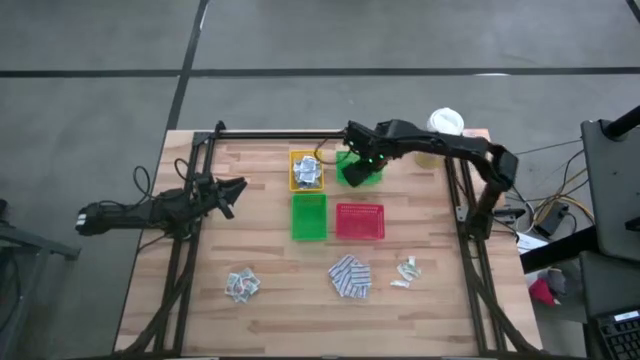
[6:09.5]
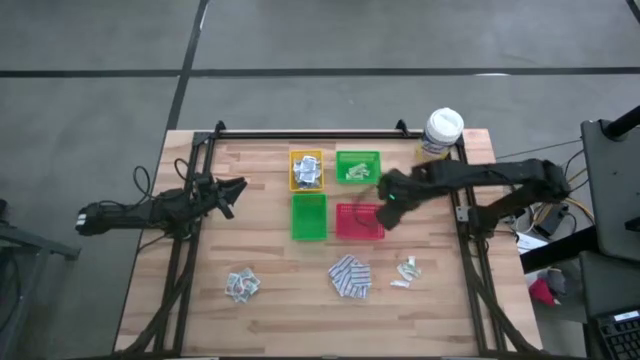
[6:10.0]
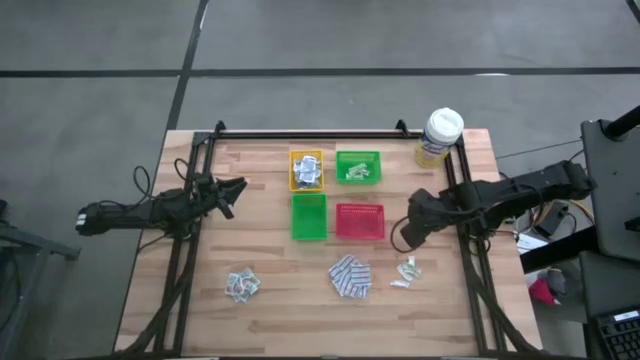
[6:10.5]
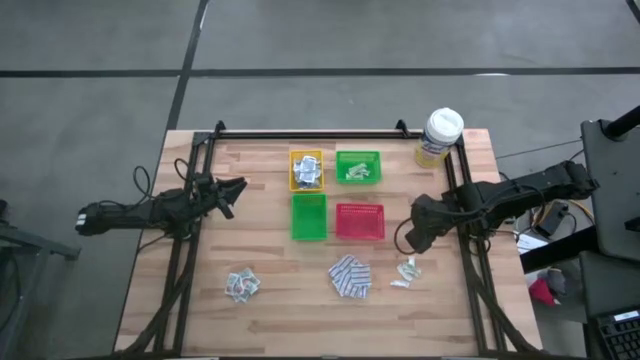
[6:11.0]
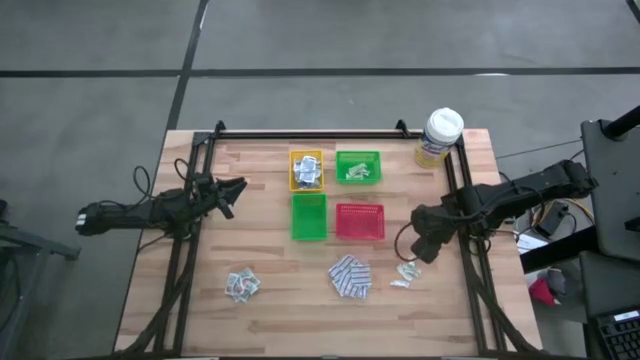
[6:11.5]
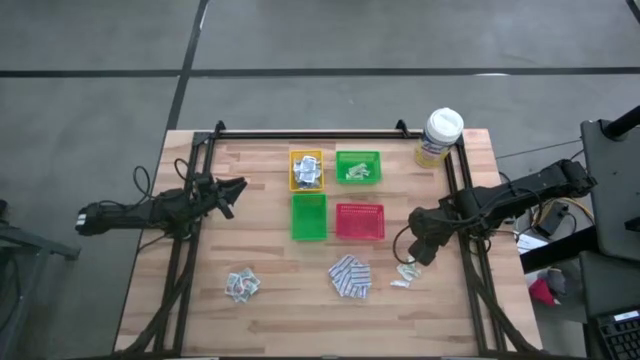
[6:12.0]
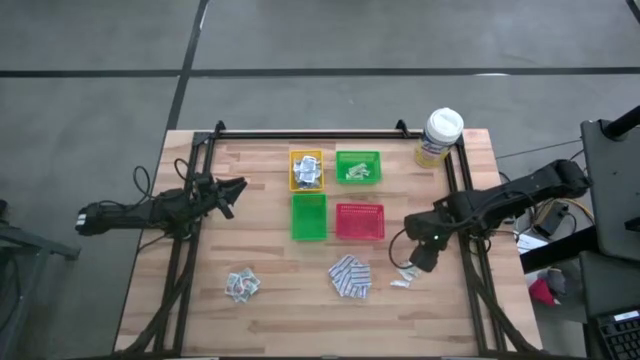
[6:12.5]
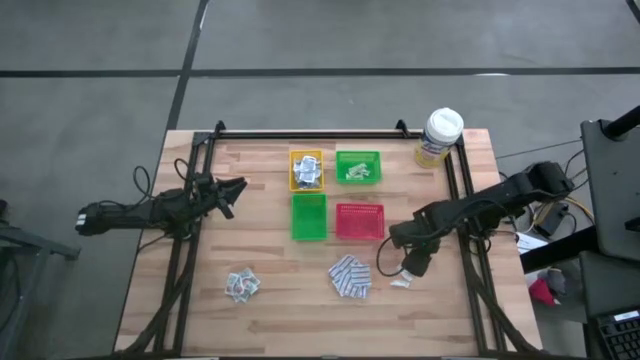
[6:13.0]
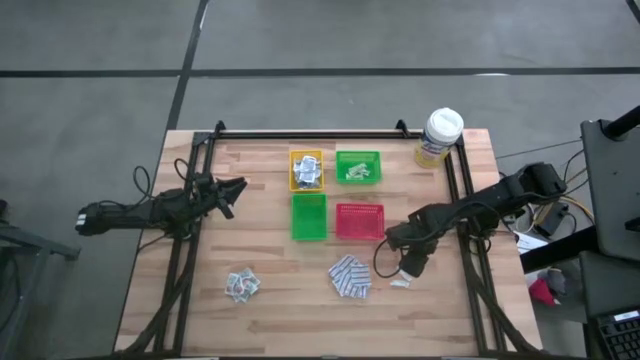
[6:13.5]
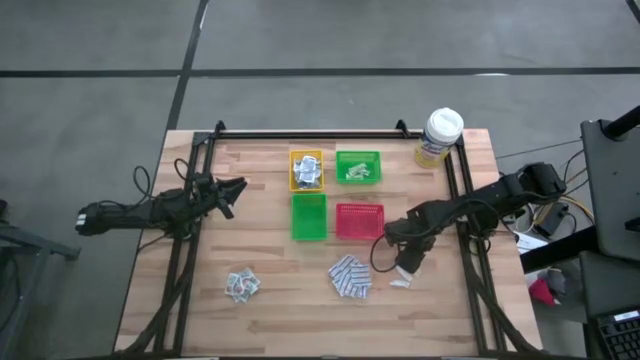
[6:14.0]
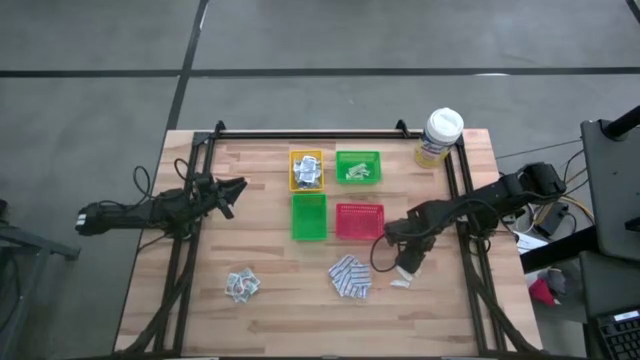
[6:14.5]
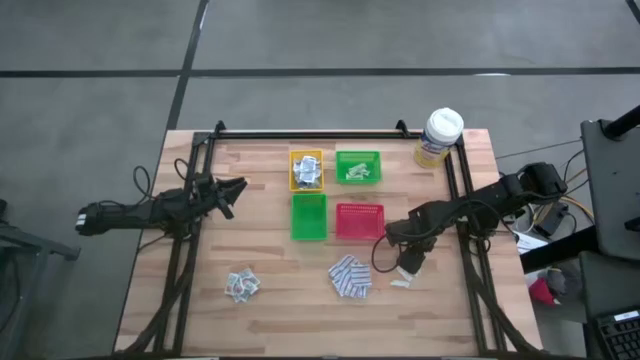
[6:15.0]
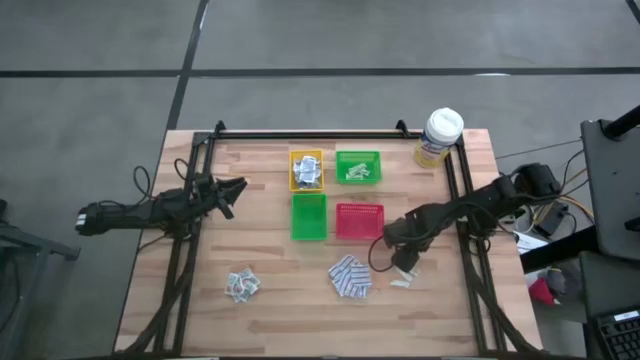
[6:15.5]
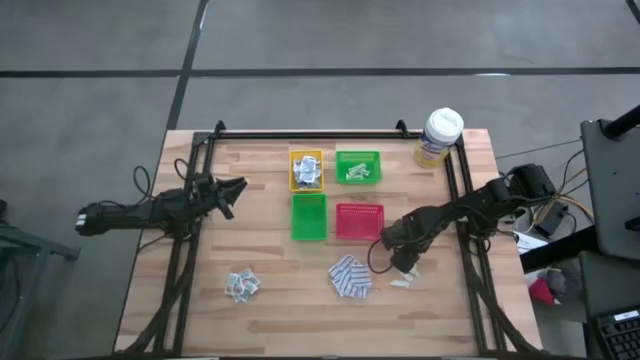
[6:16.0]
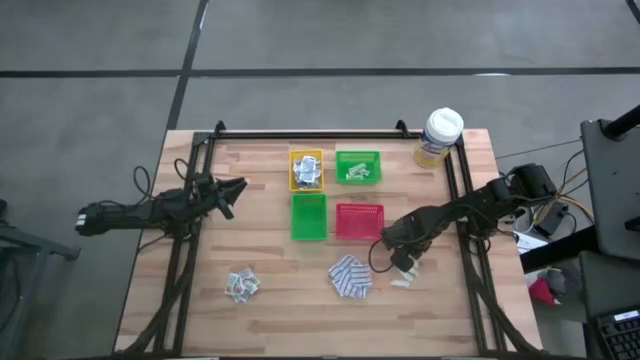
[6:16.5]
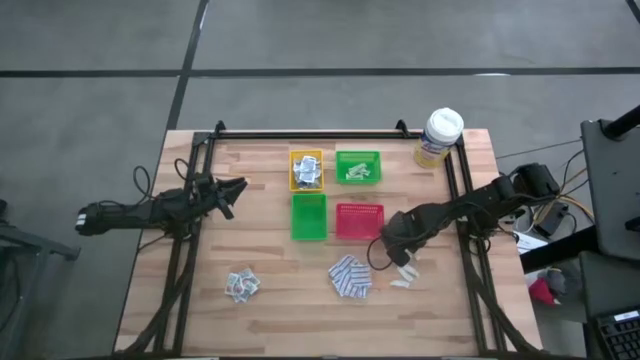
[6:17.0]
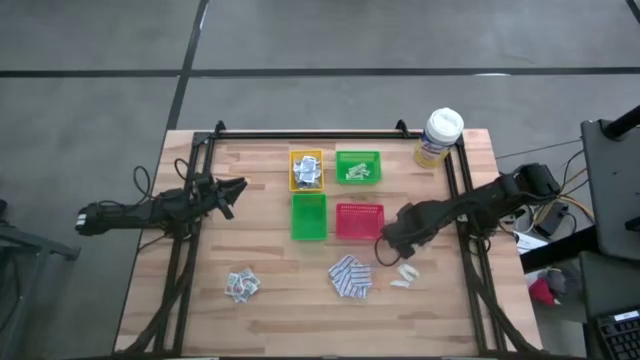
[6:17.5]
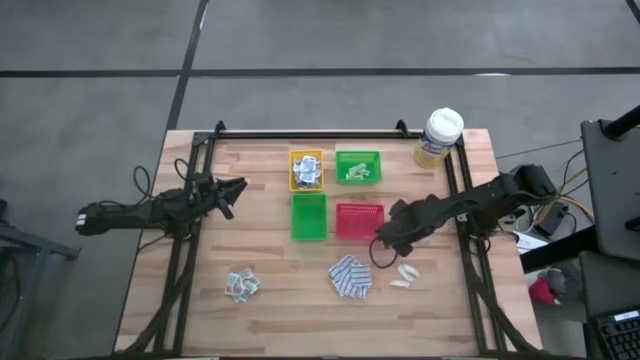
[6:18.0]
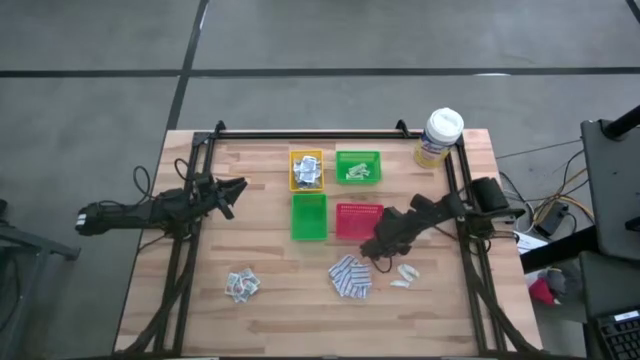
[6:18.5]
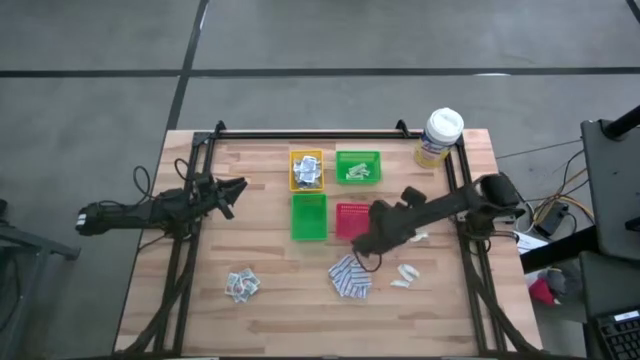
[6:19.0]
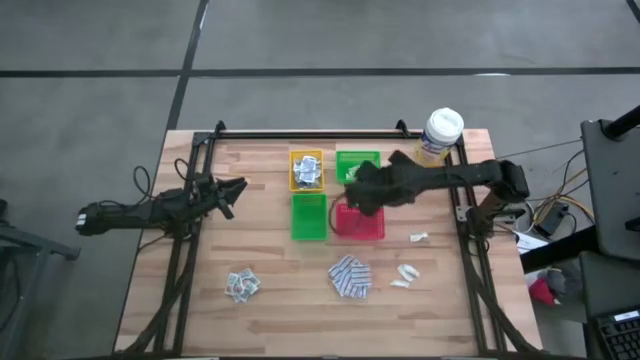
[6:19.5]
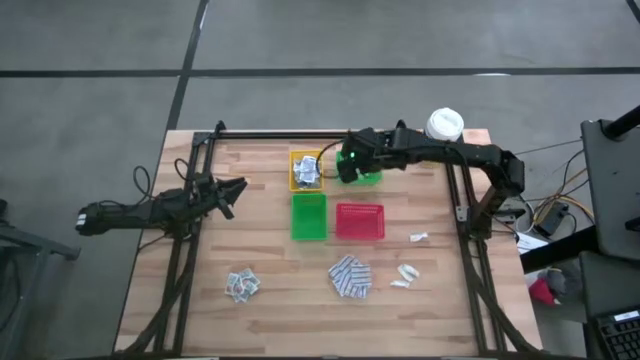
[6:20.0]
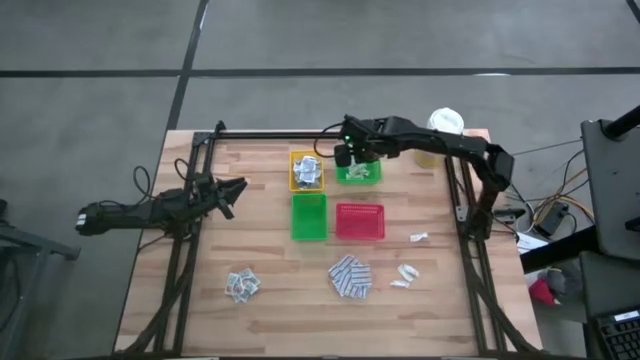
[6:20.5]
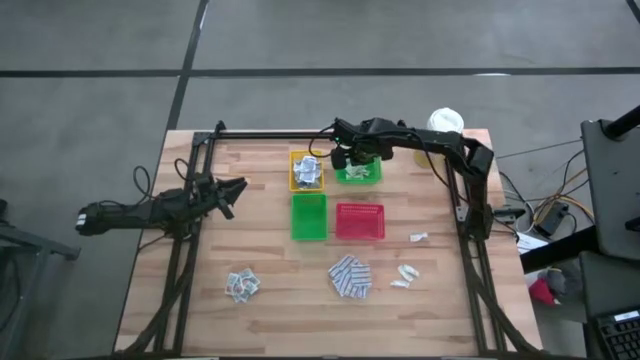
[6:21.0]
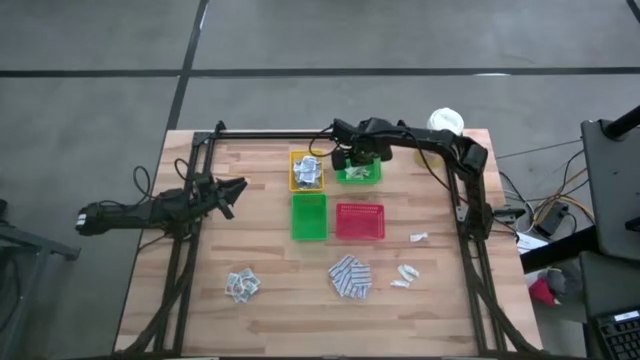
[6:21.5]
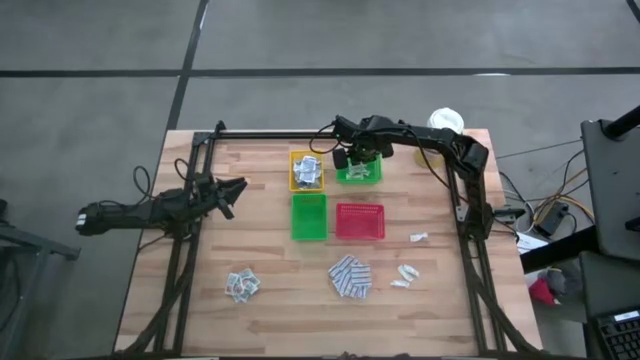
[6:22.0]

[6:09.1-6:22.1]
Task: Pick & Place First Aid Supplies
Put the green bandage pack into the top green bin

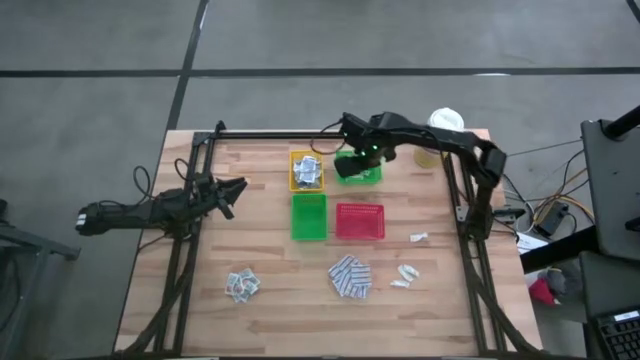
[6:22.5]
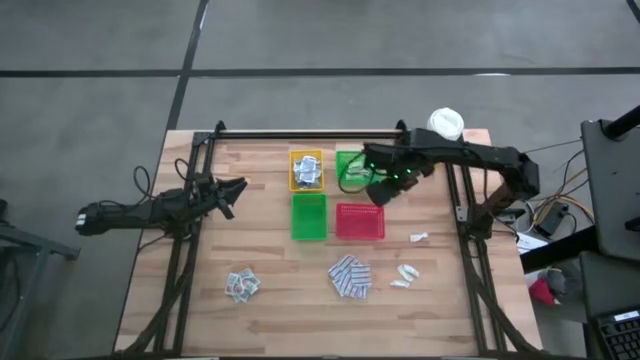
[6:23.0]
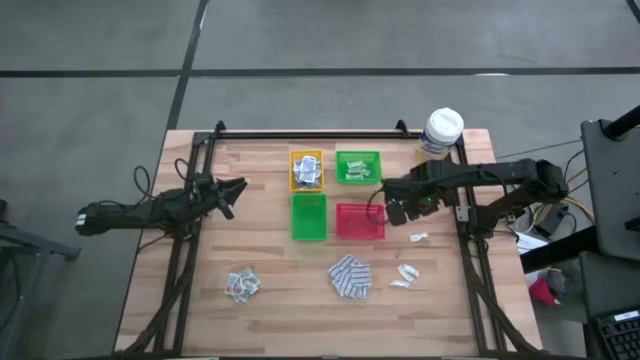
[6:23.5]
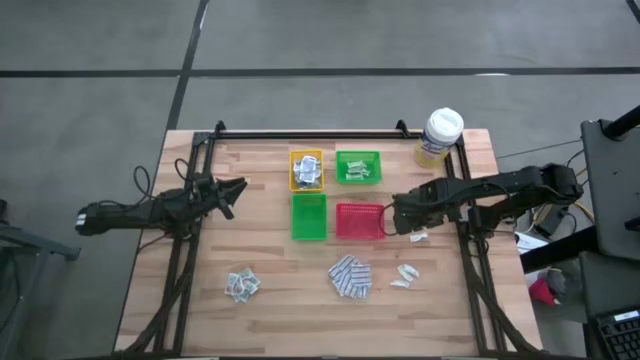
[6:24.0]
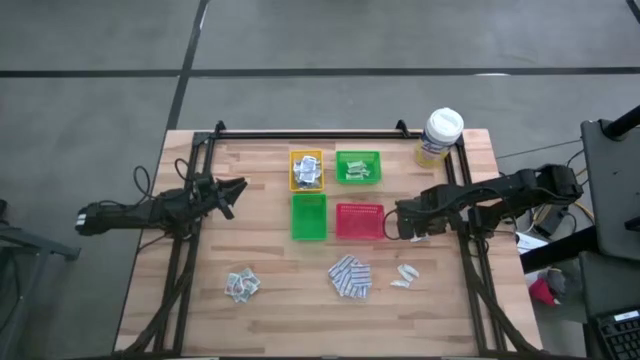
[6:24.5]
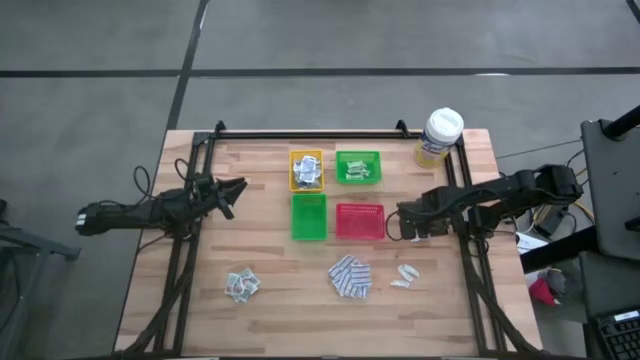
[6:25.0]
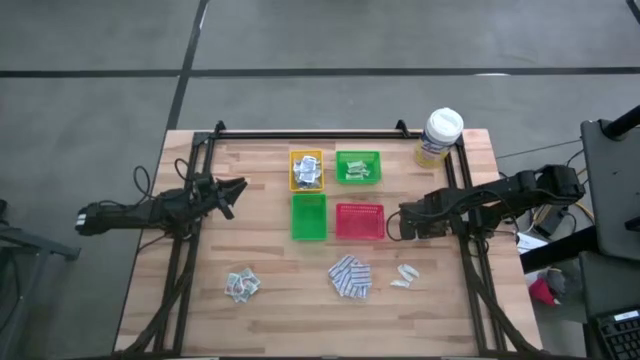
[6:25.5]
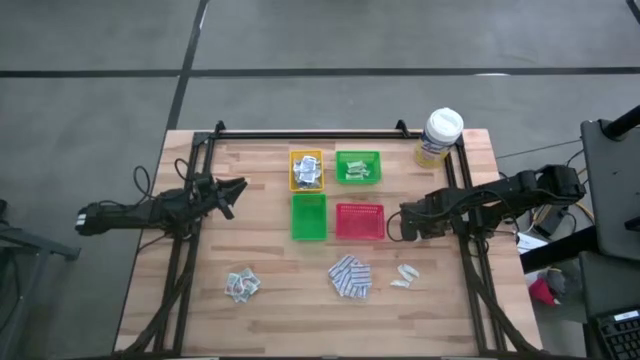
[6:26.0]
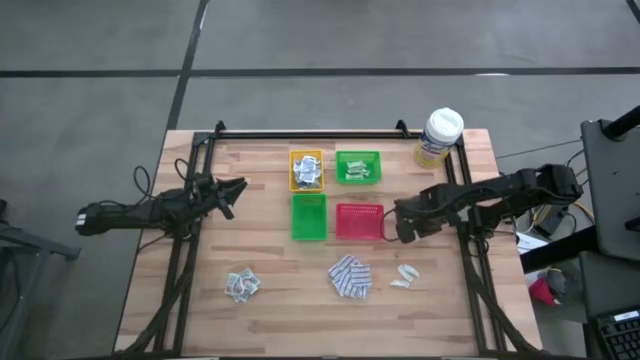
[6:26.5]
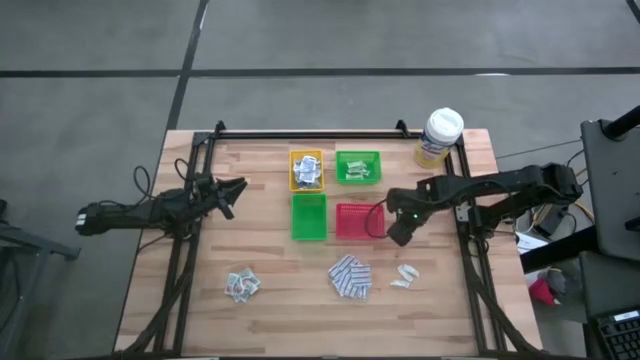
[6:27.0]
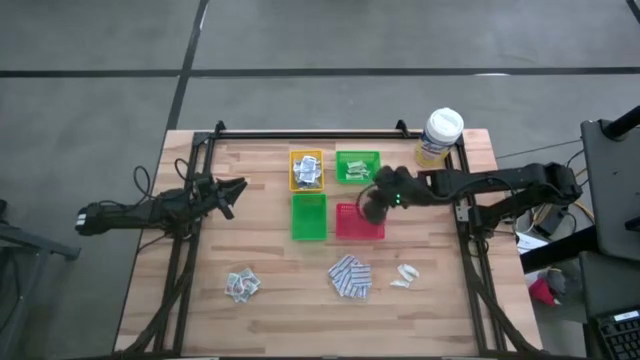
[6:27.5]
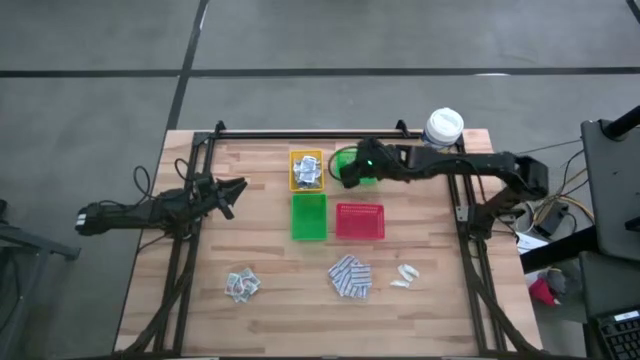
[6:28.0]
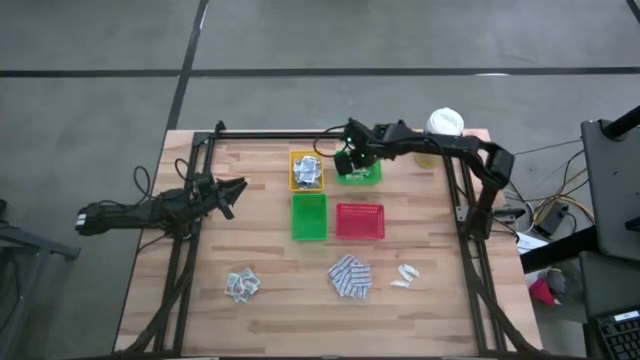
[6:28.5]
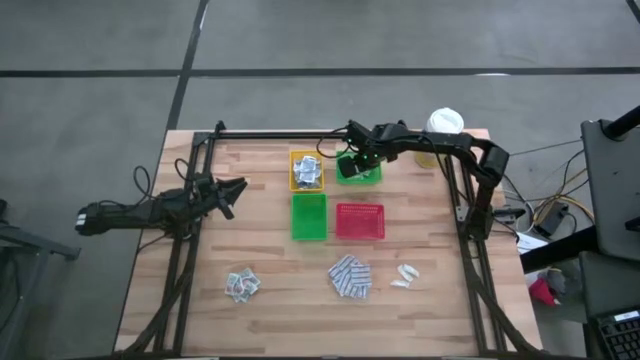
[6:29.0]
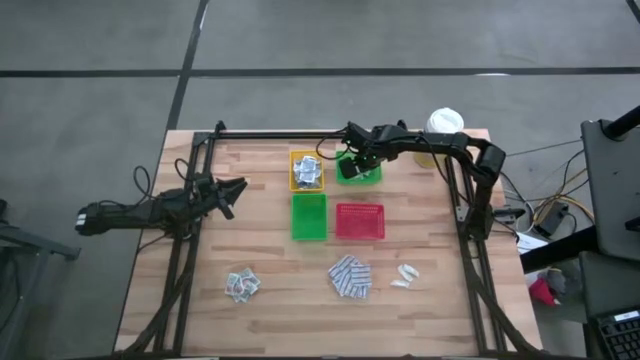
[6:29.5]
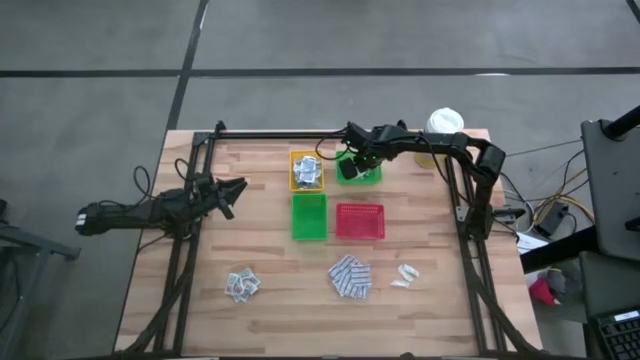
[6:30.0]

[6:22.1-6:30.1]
Put the green bandage pack into the top green bin
